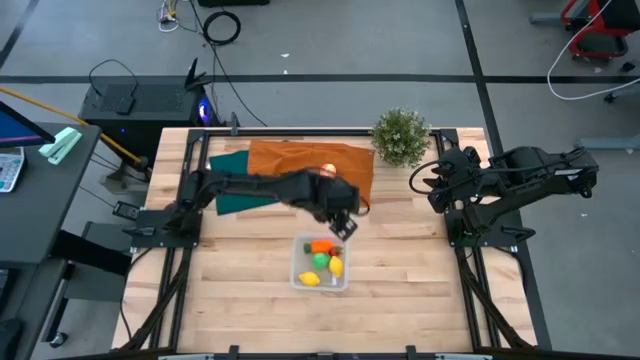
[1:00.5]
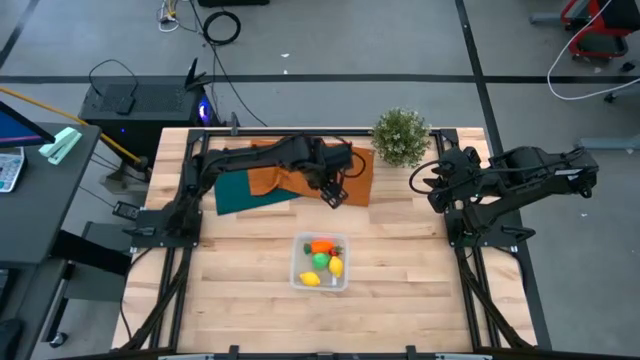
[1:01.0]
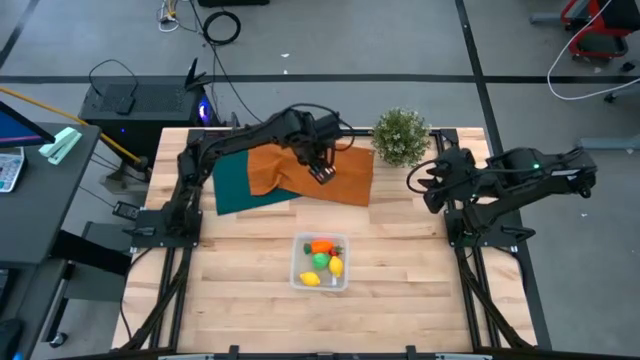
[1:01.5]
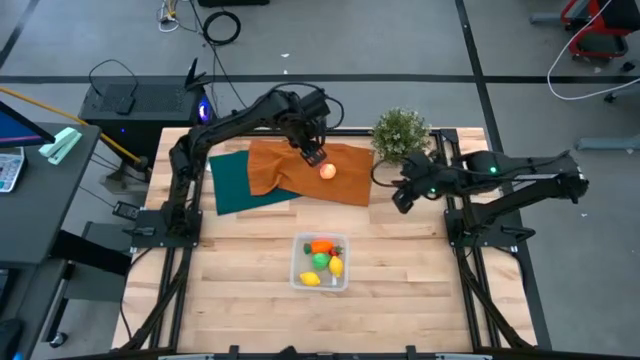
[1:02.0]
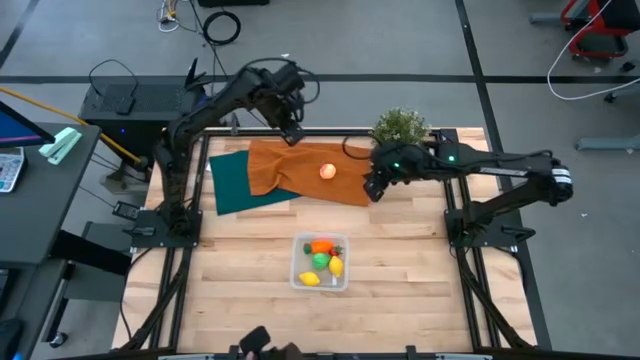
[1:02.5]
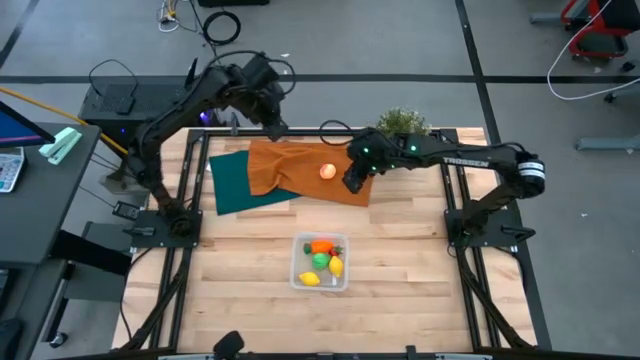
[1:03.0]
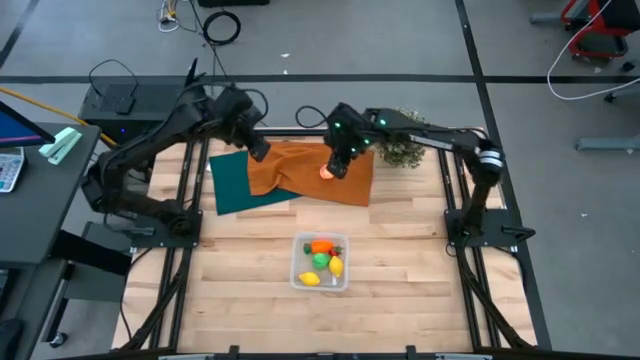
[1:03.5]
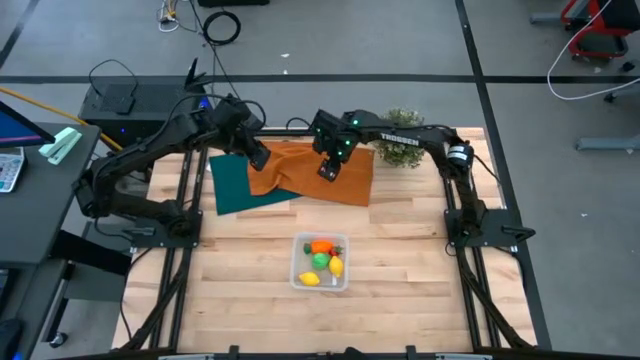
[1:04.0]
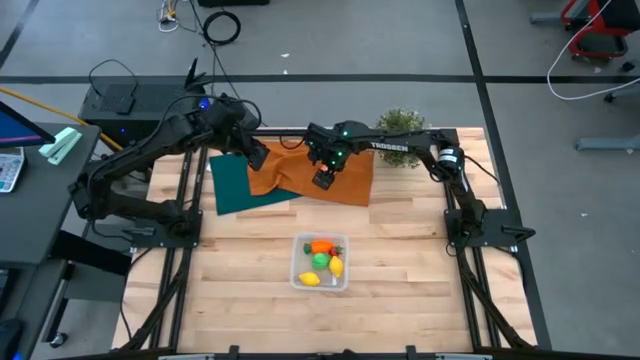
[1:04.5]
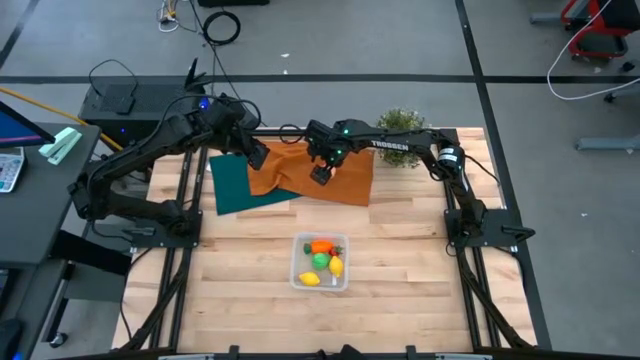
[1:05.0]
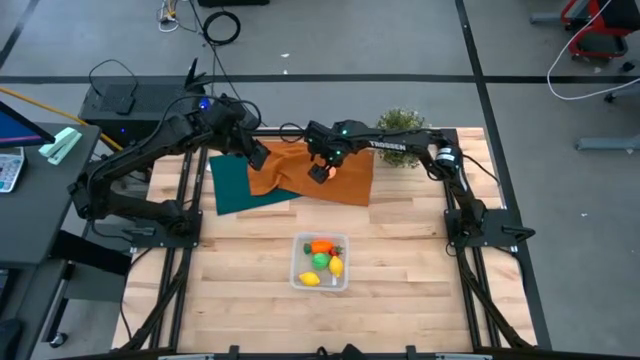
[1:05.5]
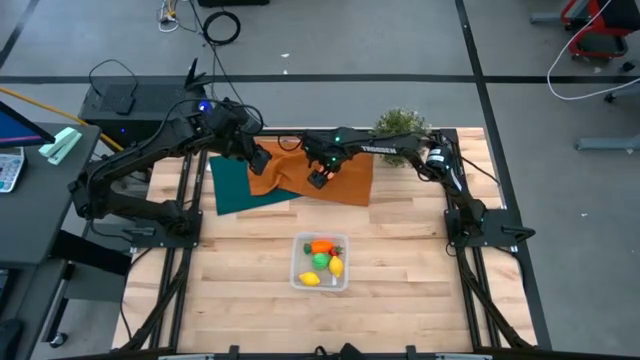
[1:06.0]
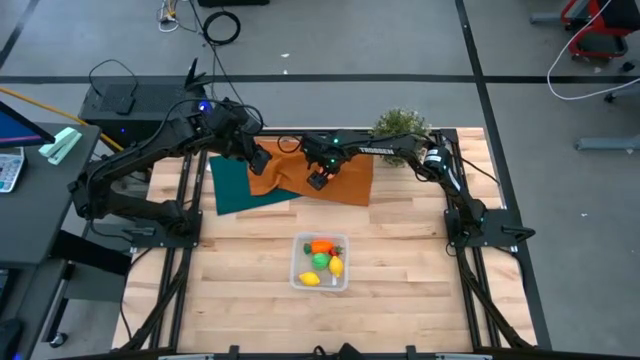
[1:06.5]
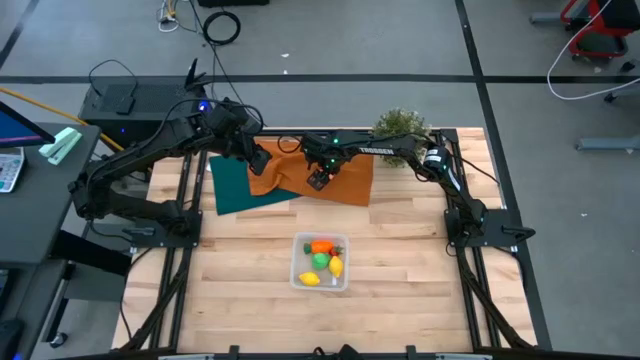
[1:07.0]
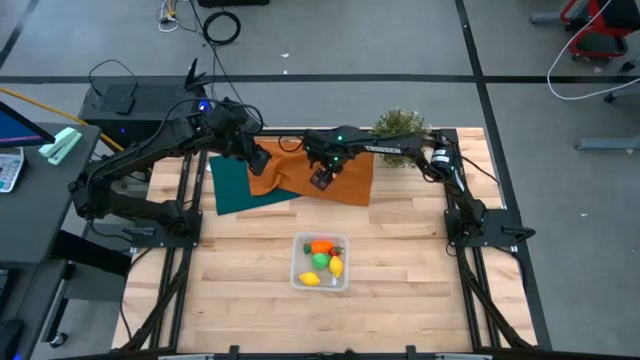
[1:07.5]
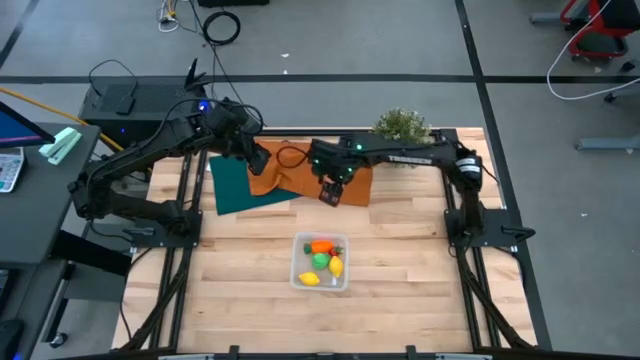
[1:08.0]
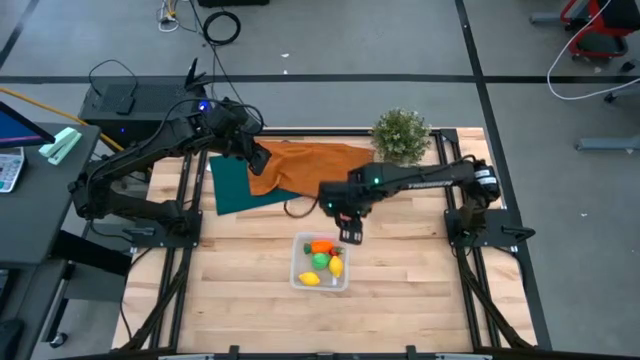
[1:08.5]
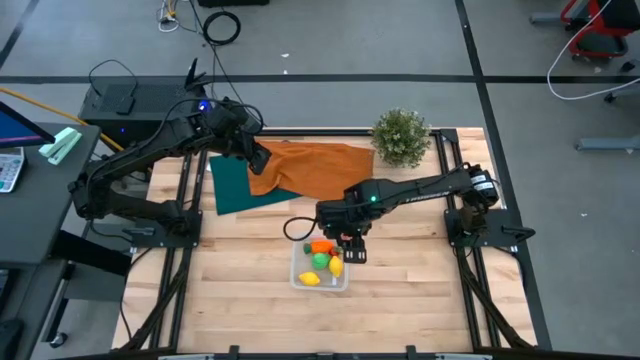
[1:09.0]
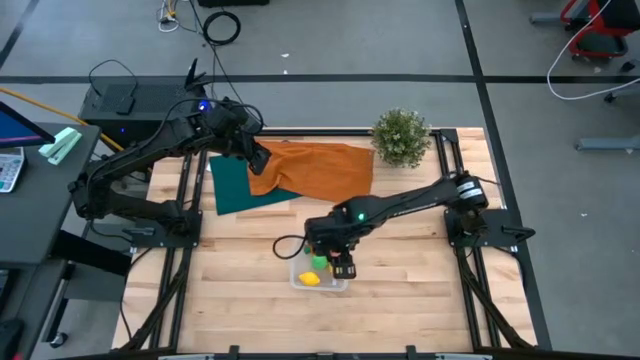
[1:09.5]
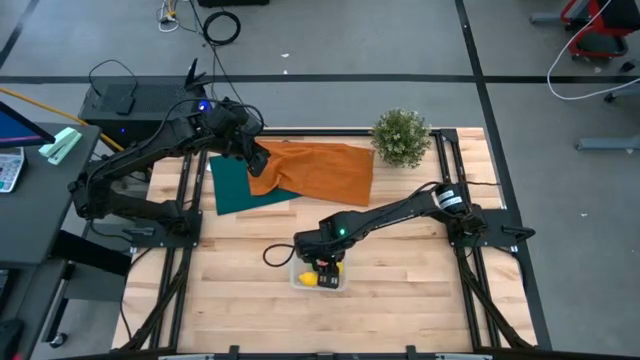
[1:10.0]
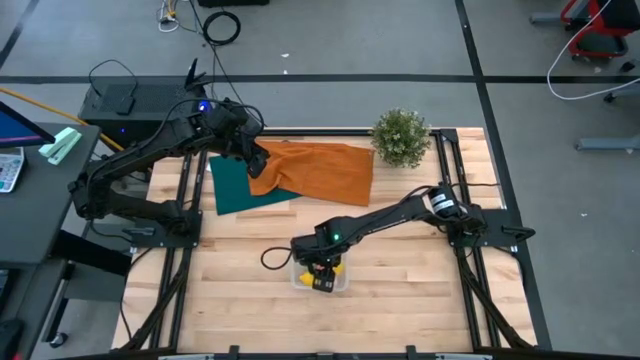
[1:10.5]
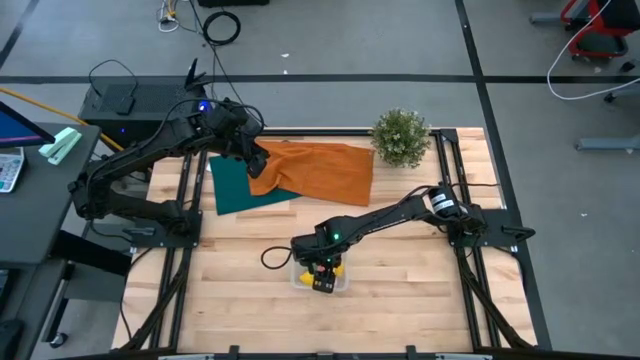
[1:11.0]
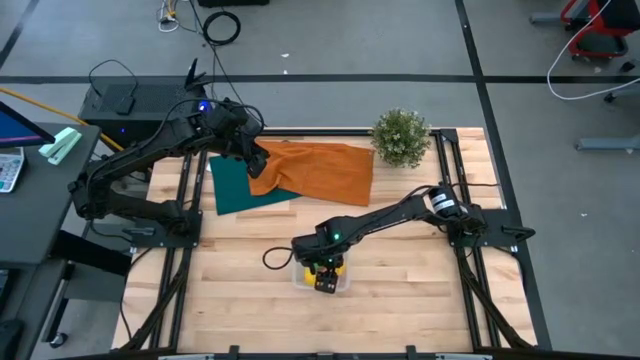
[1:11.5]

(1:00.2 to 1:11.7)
Task: Pick and placing Produce into tupperware
Put the pink peach into the transparent container

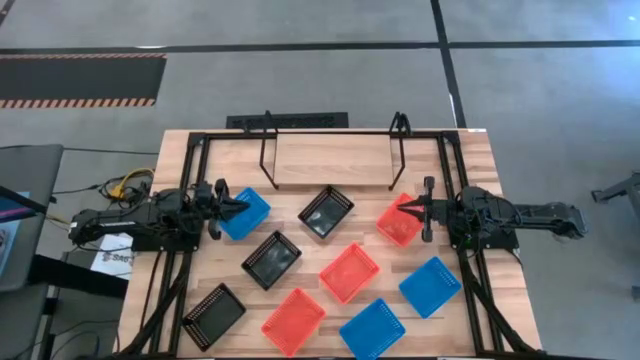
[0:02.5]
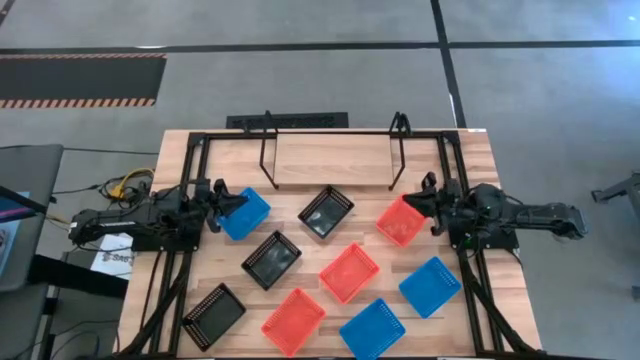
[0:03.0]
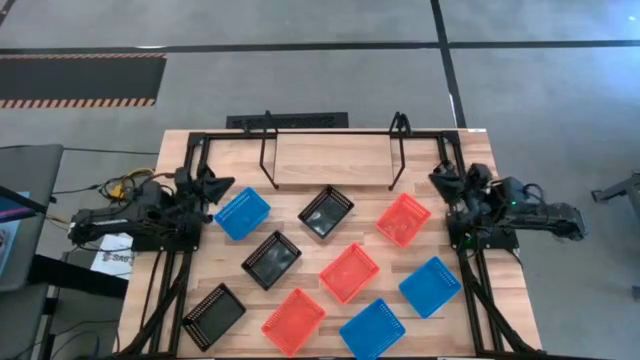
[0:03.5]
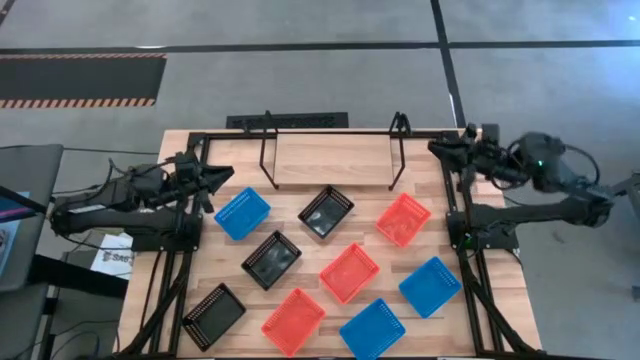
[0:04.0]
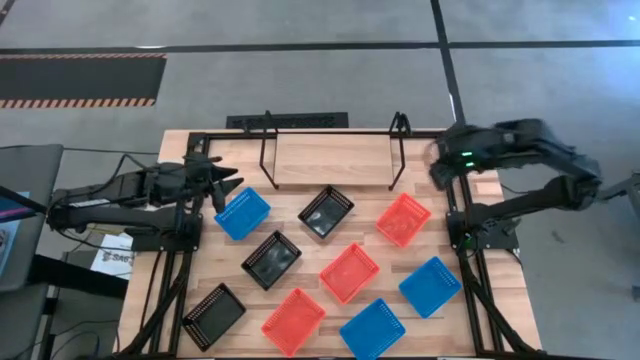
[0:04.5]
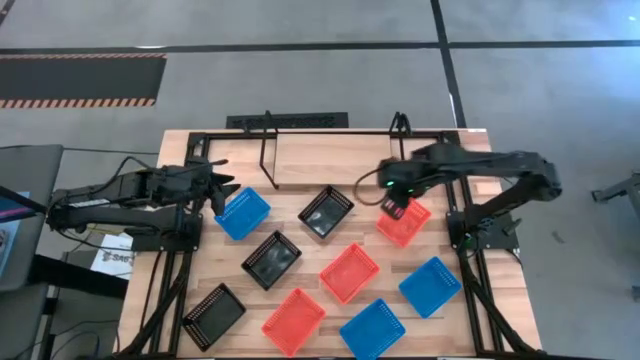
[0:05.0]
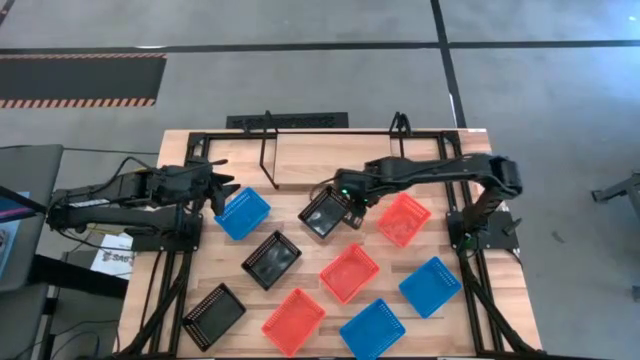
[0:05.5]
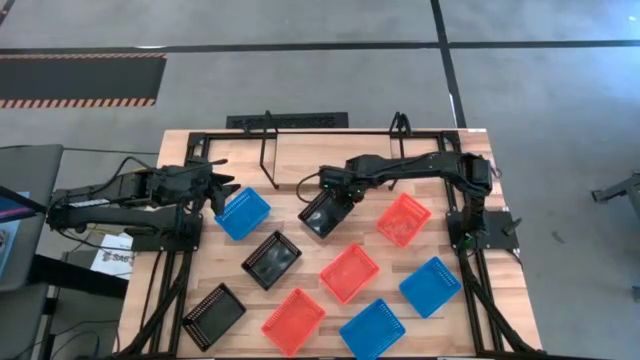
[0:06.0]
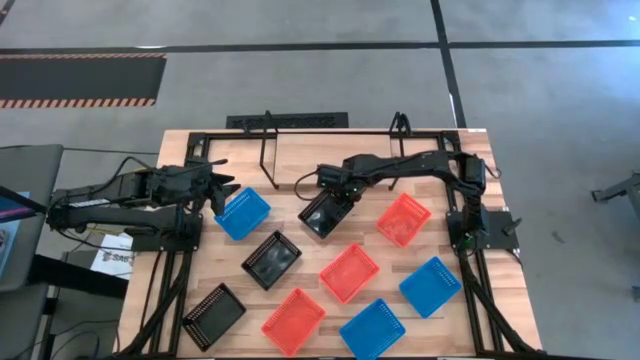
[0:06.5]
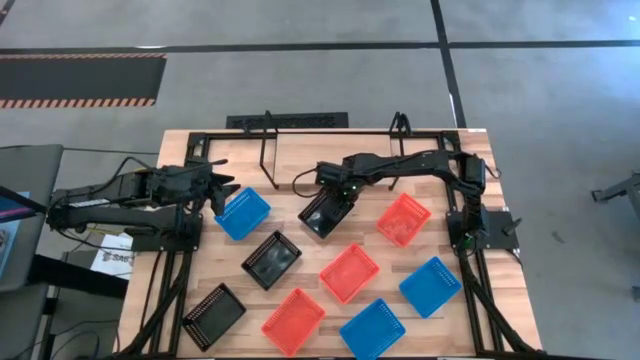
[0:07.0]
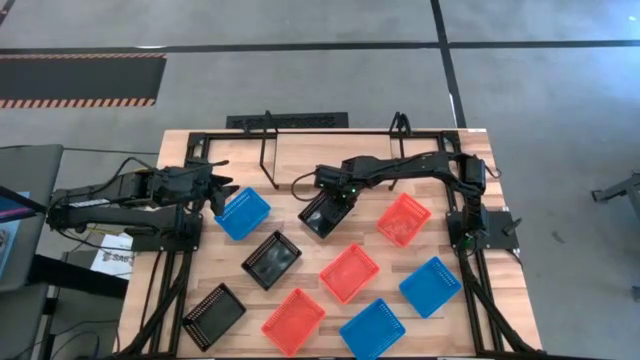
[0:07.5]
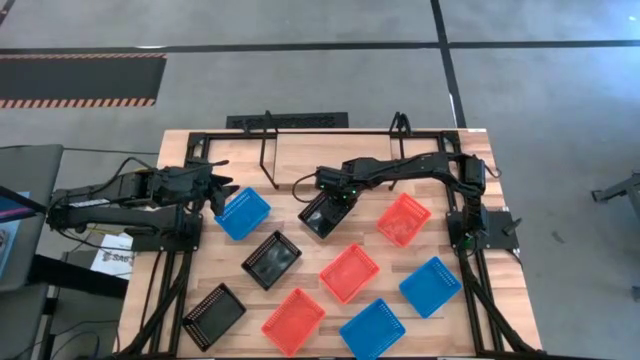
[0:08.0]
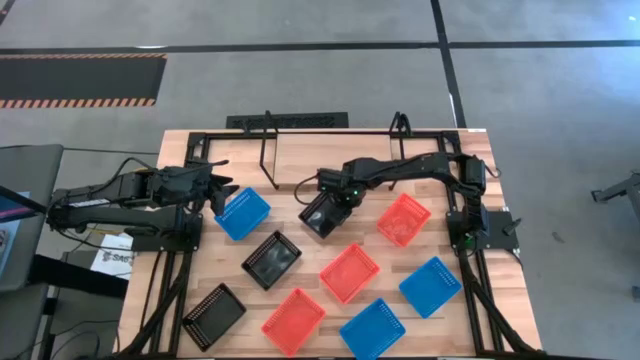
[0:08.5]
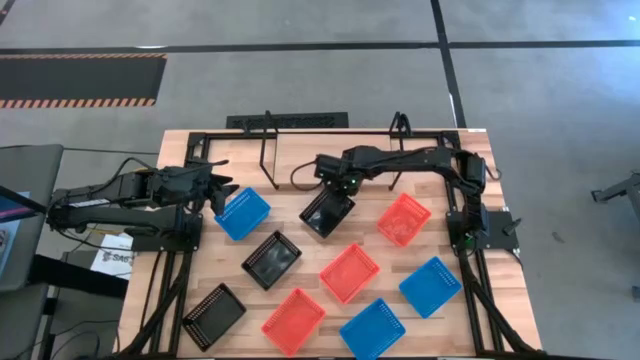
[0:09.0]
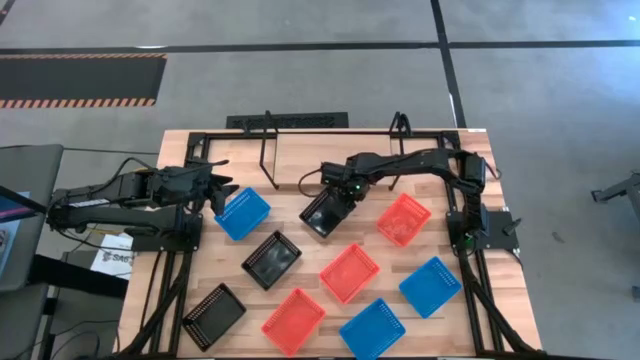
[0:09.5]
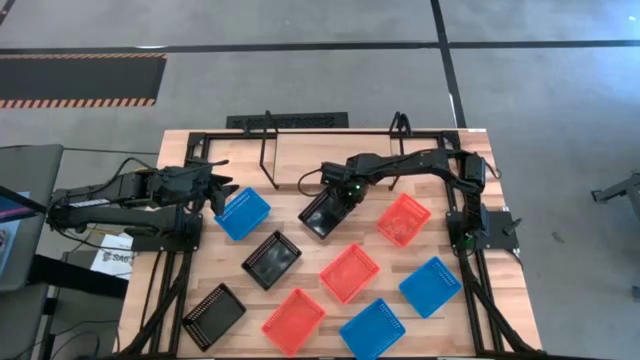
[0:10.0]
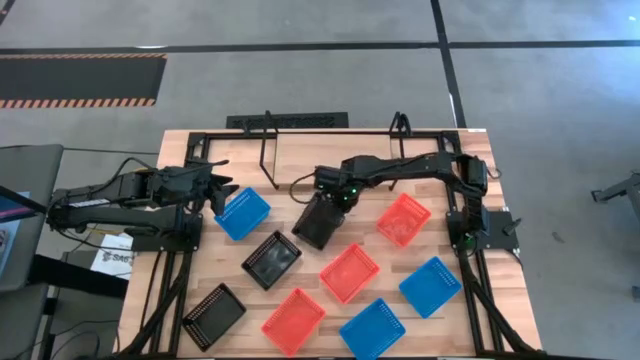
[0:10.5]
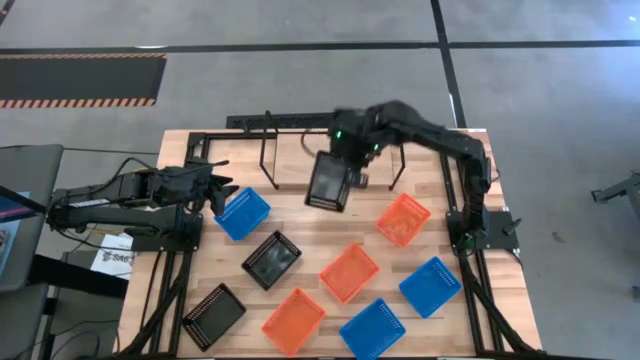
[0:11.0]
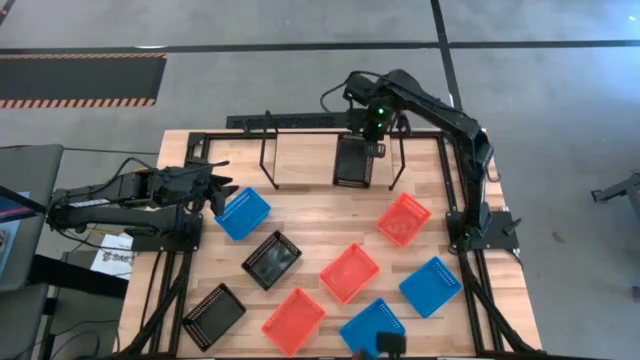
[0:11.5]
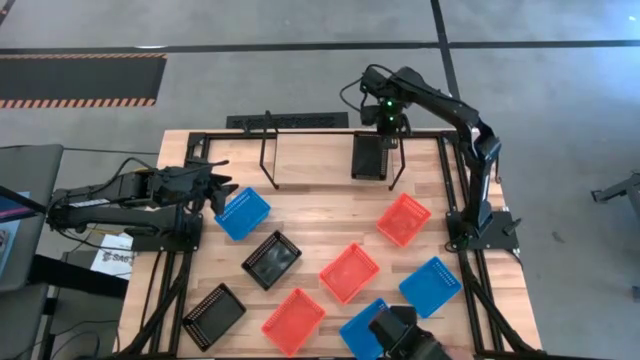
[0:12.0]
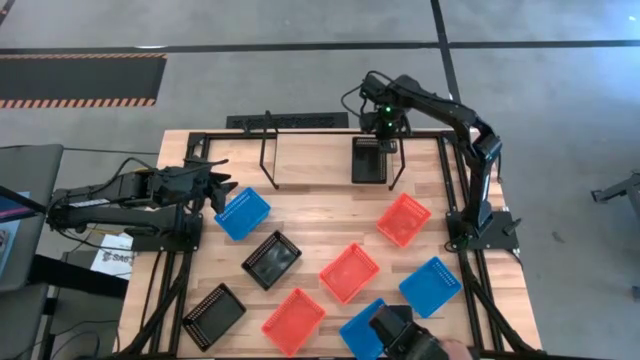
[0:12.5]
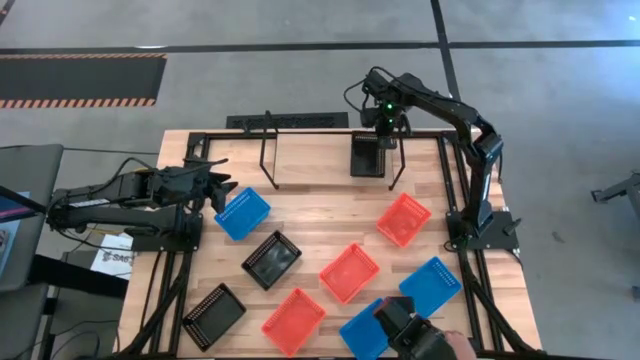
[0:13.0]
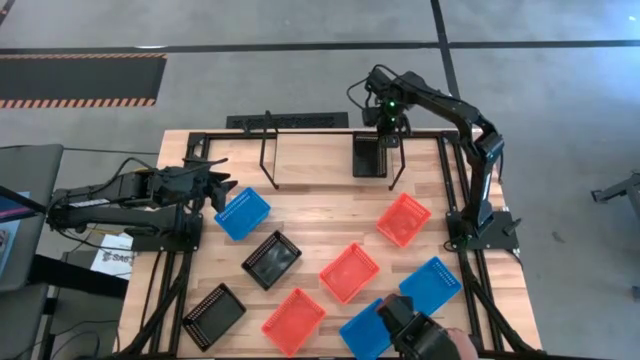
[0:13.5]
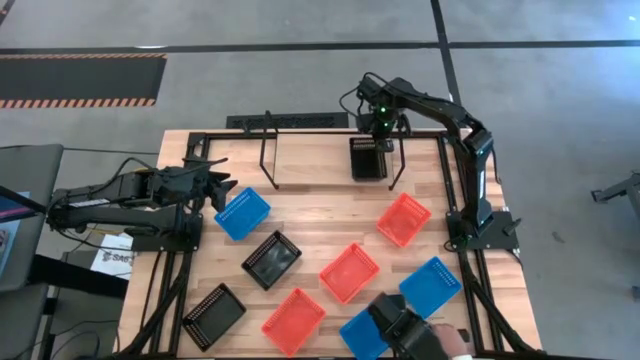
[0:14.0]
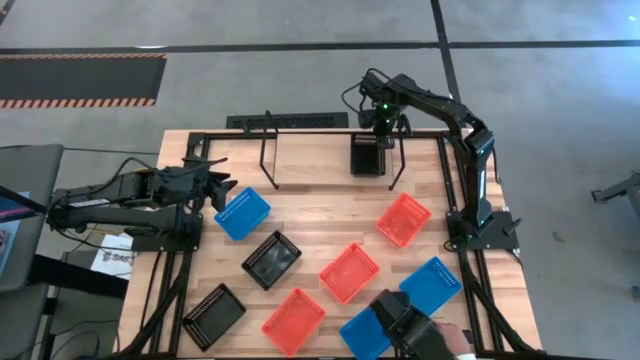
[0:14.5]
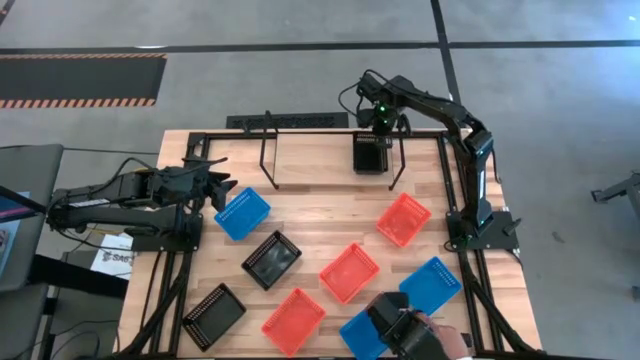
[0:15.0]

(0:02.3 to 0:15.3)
Task: Stack baskets on shelf by color
Put the top black bin on the shelf
